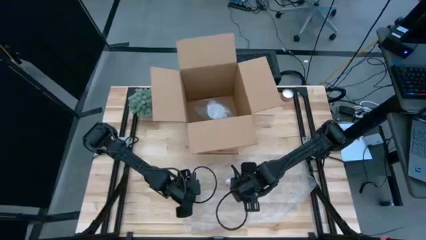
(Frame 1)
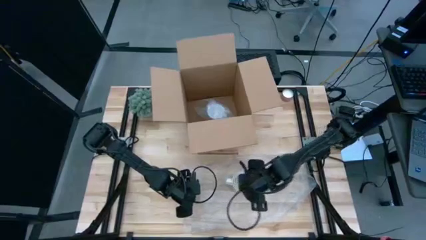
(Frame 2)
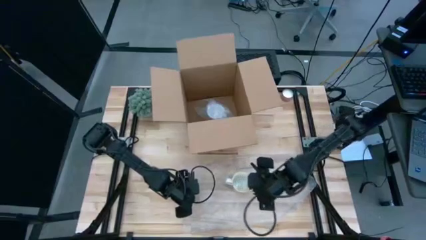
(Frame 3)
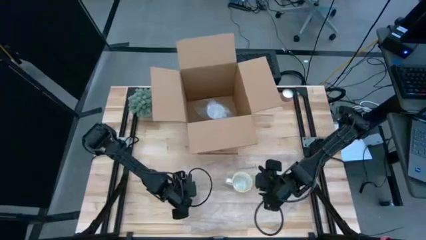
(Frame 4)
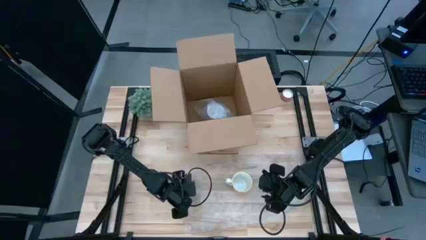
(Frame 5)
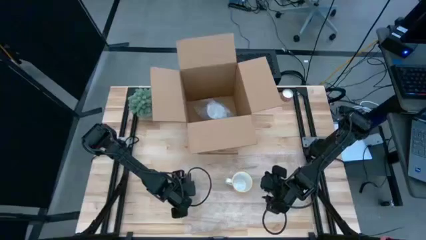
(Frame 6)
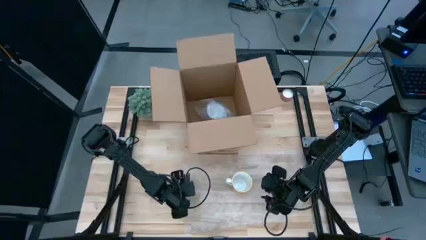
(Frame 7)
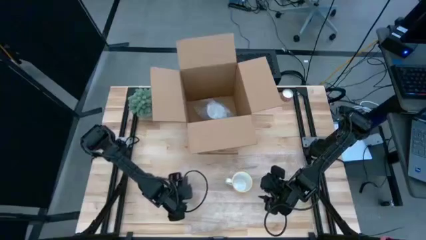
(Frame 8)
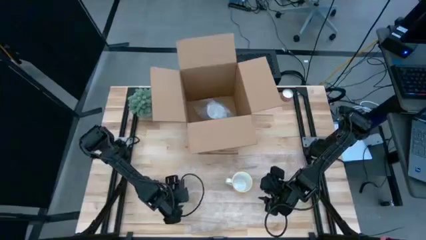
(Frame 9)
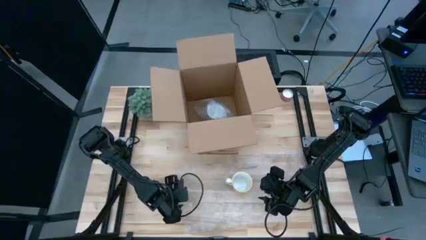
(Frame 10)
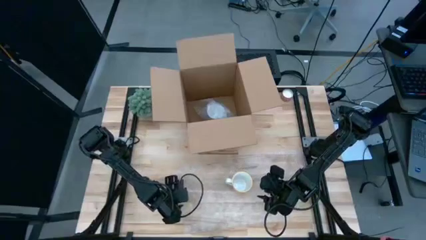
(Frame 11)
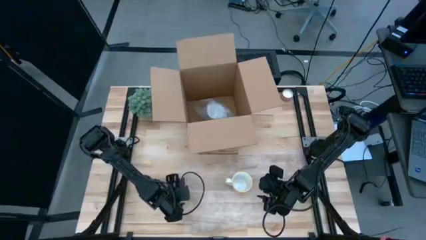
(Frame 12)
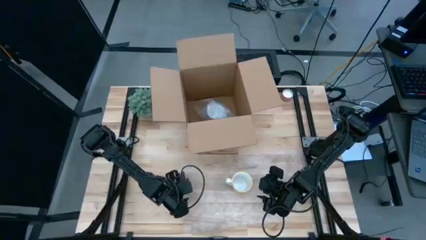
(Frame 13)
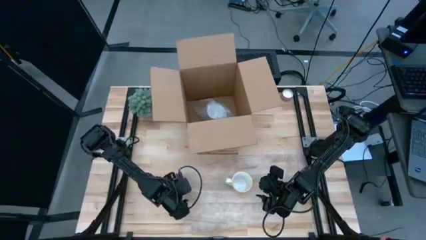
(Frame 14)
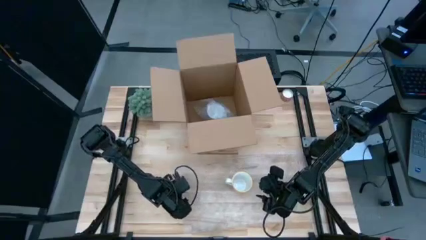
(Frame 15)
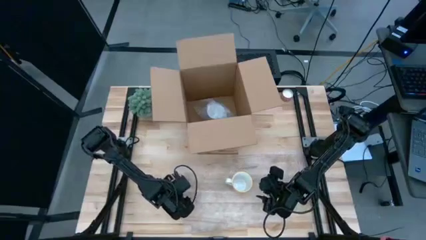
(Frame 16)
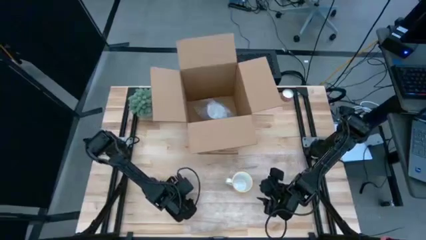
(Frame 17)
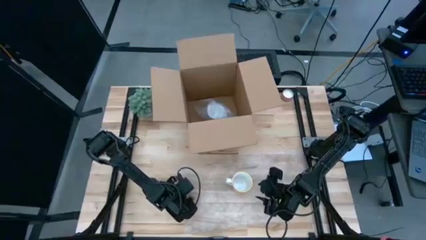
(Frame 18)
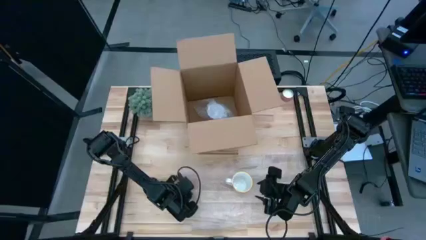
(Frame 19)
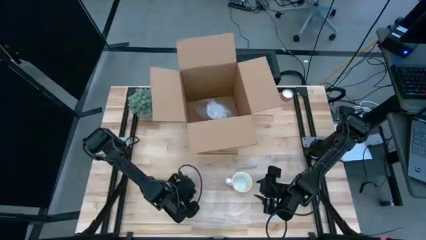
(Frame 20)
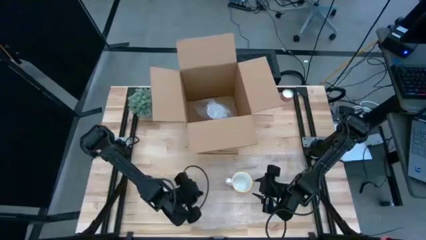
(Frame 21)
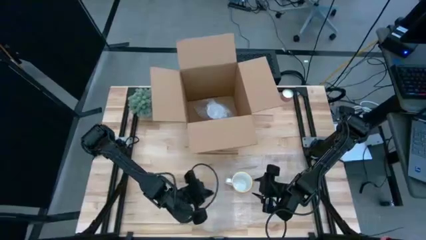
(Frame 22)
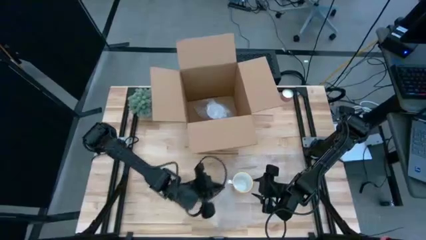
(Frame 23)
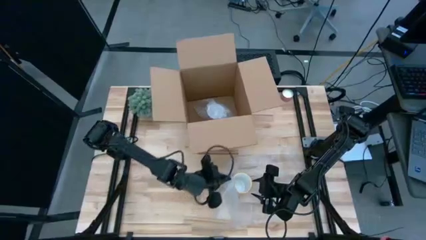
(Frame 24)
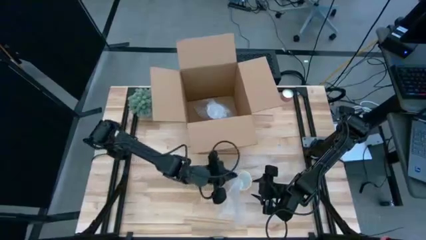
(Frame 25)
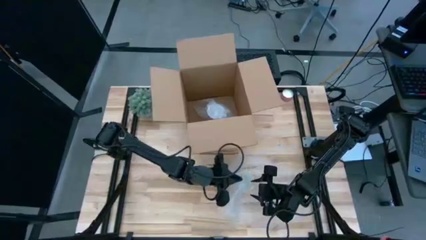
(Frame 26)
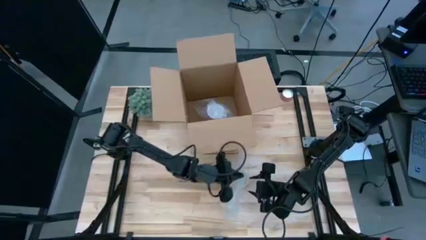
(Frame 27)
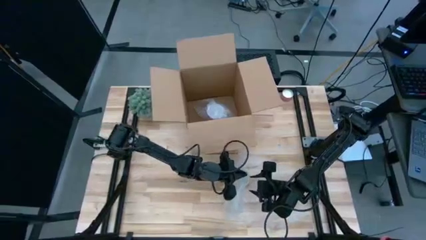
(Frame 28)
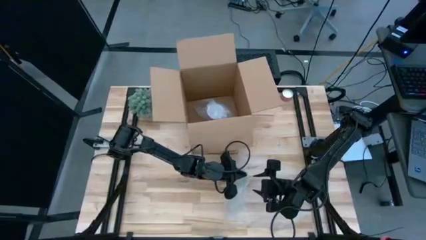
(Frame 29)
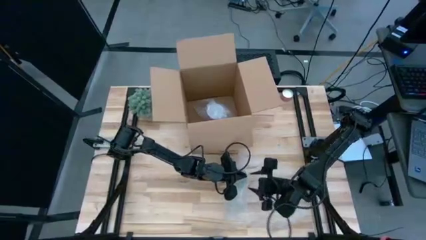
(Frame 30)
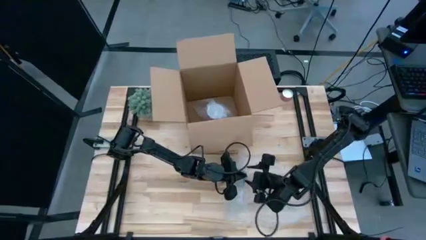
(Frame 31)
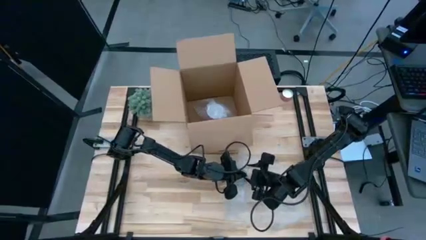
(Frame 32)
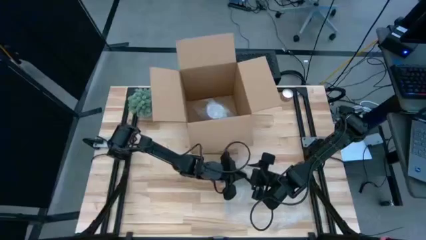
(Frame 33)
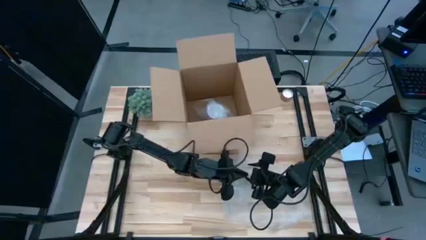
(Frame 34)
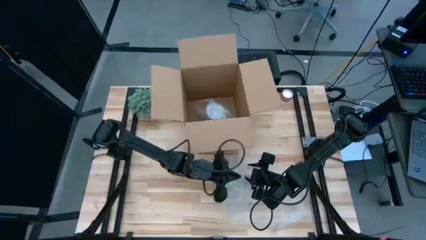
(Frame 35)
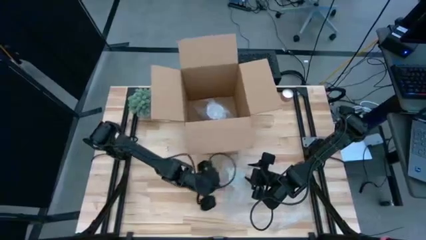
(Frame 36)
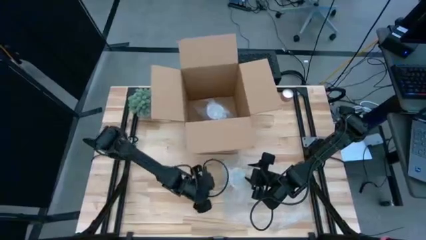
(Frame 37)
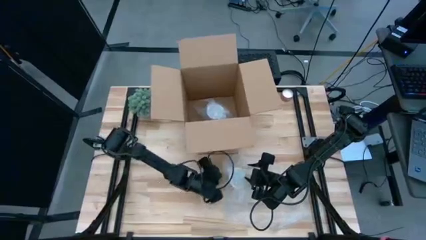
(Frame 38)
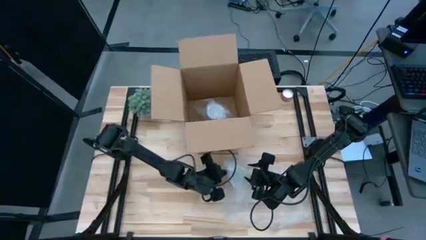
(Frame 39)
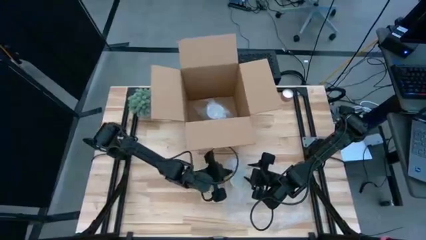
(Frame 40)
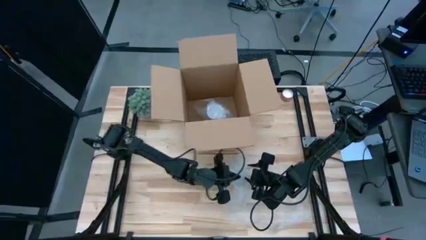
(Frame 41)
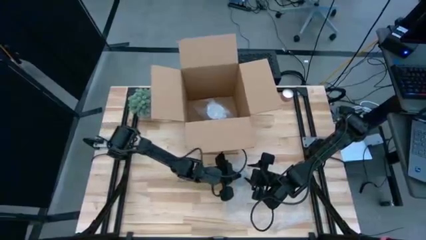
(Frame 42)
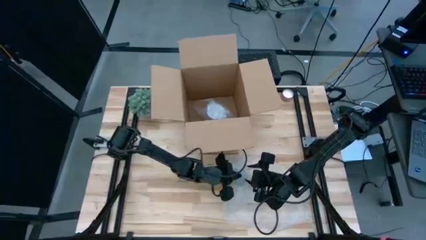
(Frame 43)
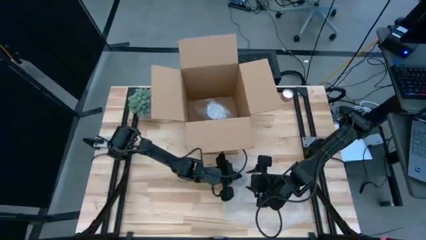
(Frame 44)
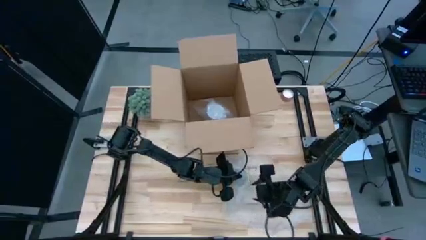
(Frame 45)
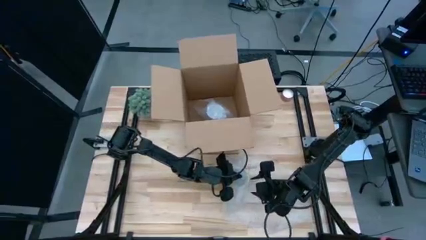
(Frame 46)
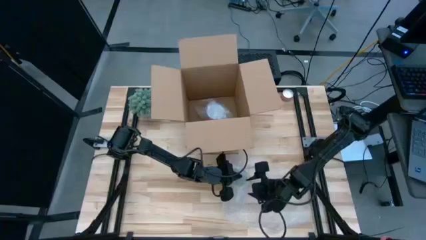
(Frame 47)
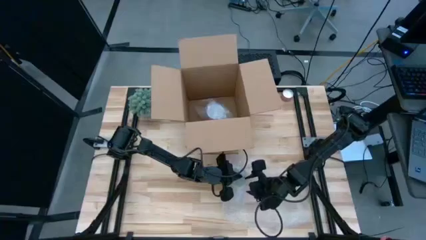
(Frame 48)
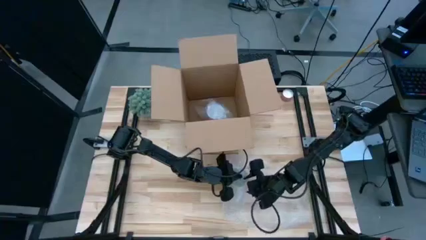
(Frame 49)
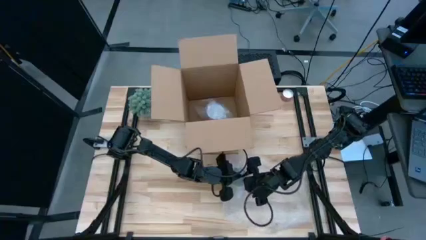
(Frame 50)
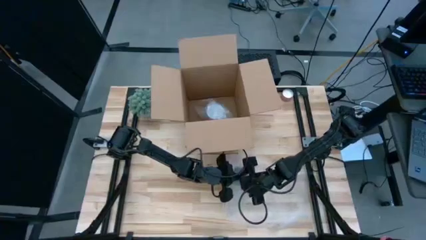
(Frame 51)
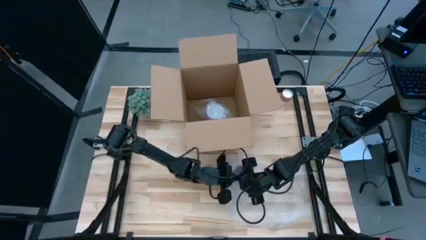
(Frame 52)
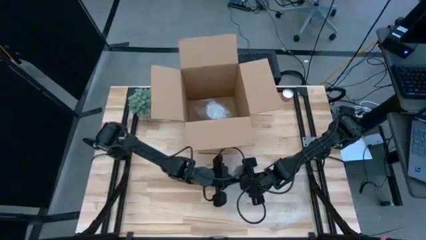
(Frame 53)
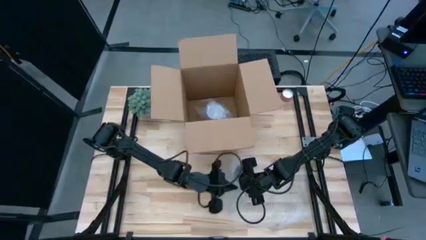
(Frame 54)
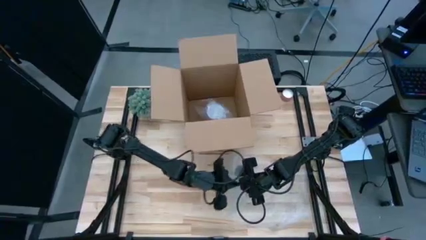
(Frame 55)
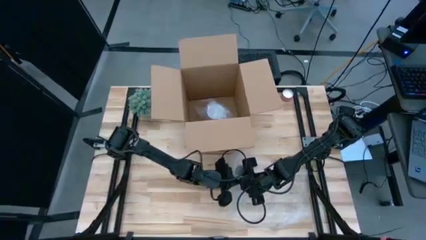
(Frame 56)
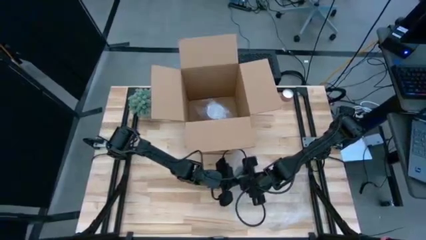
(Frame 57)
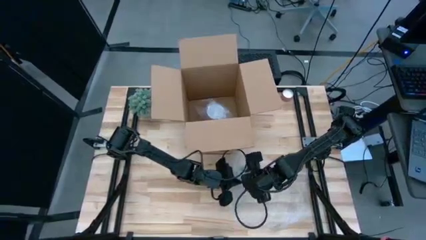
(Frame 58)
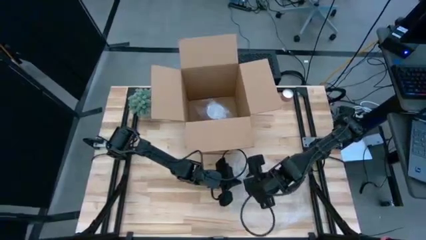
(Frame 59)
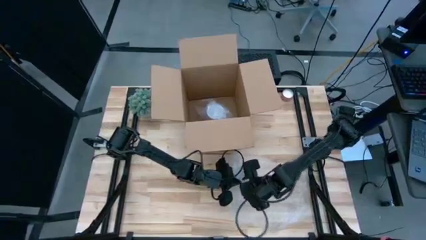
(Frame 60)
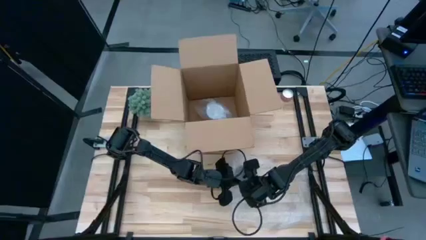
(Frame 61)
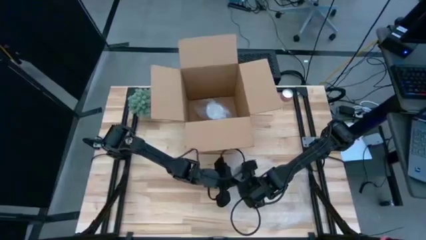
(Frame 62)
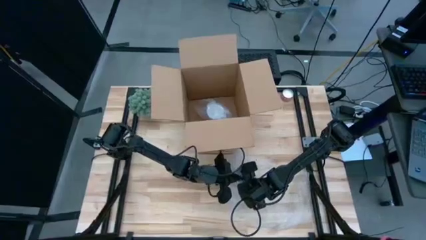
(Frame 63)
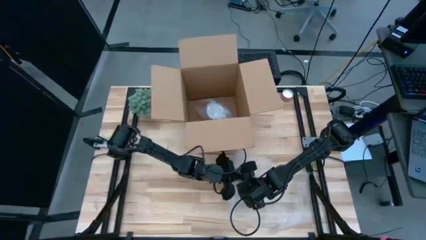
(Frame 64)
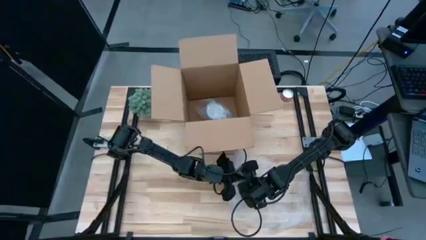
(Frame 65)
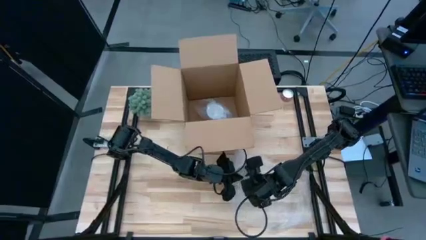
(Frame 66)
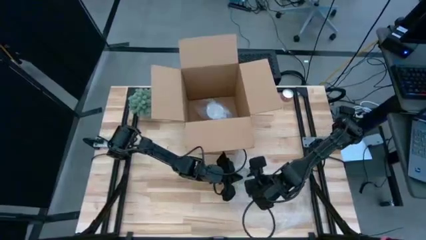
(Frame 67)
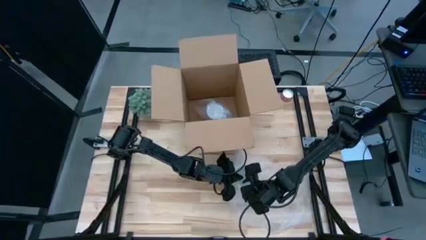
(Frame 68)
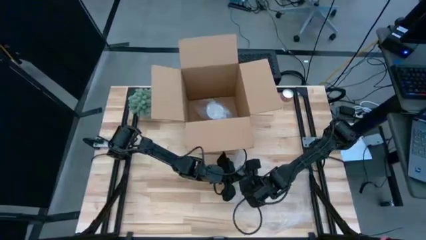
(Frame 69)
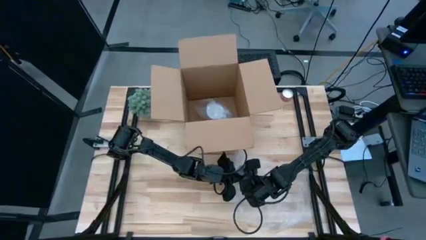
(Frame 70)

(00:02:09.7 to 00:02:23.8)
Task: wrap mug
Wrap the orange mug in the bubble wrap
